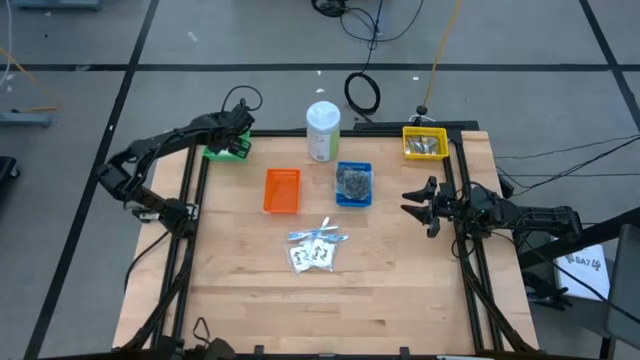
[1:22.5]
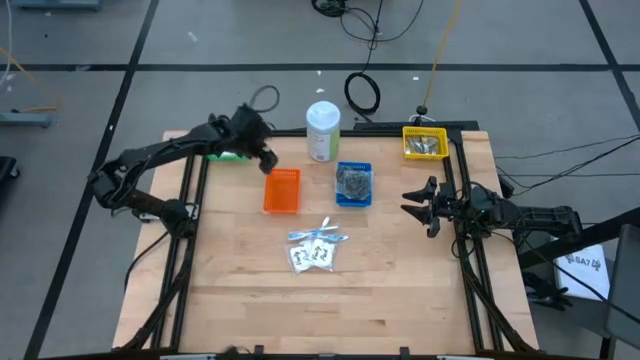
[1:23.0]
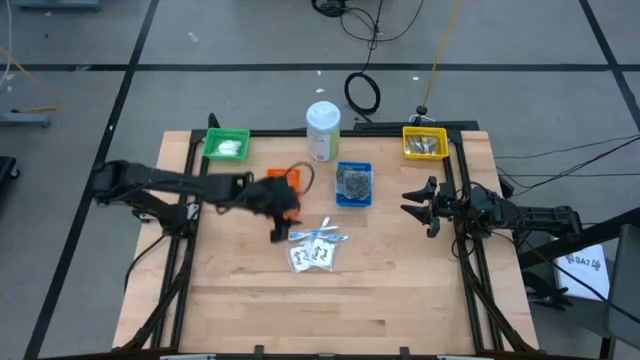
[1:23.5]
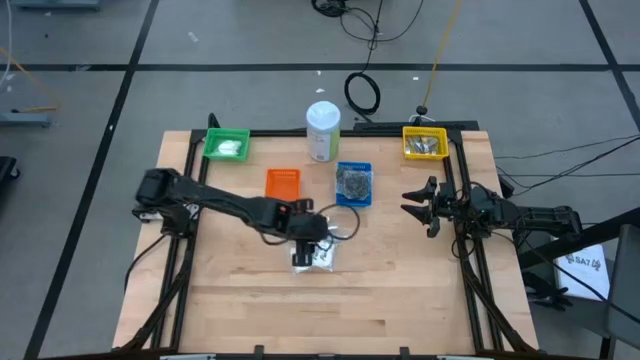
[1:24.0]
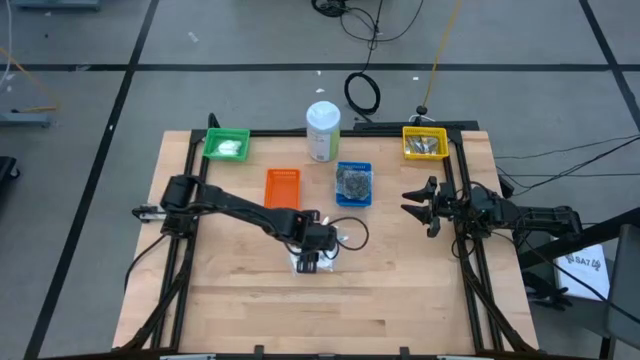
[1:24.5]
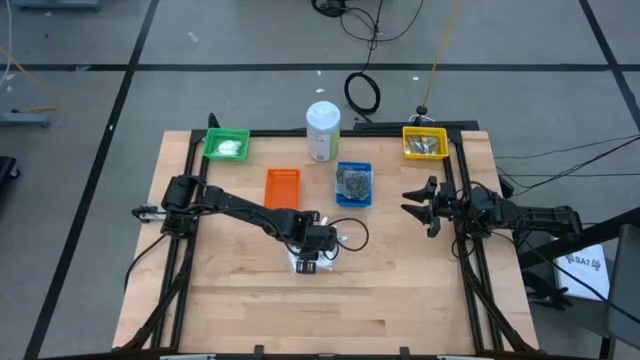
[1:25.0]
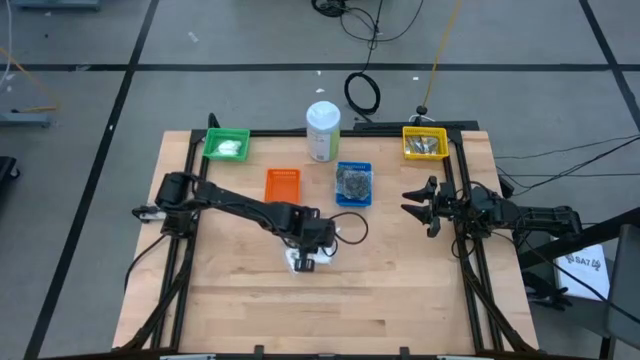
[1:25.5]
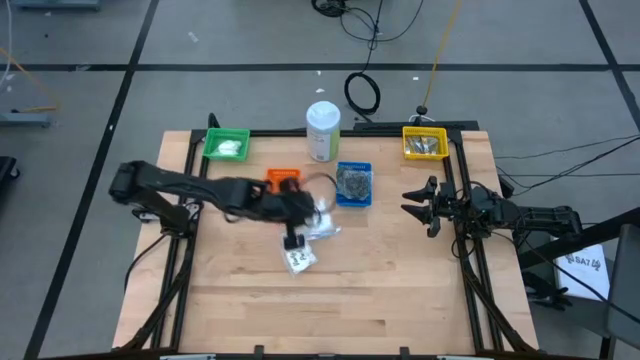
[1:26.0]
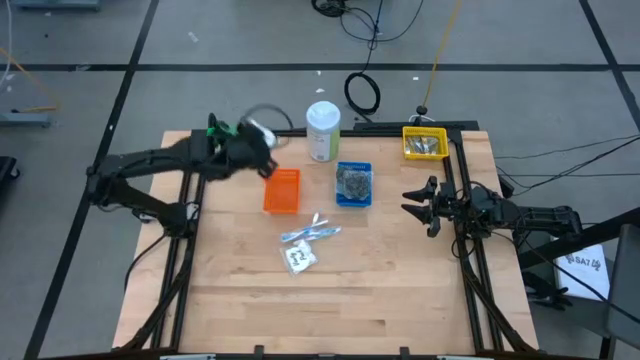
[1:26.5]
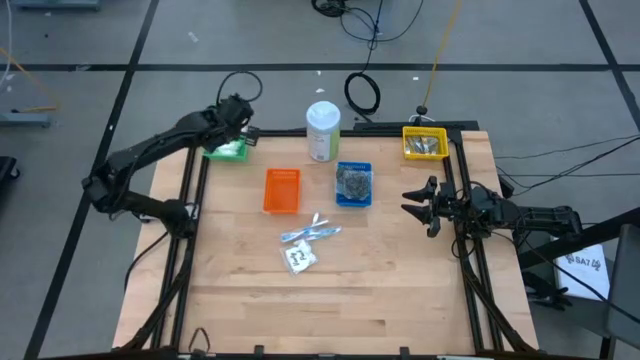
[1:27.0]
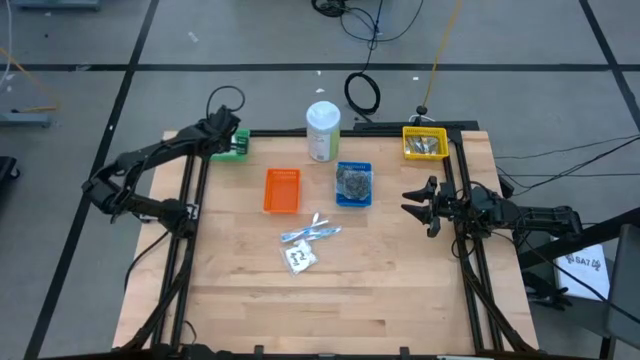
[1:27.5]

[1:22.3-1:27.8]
Task: Pick & Place Travel size toiletries
Put the right cotton pack into the green bin

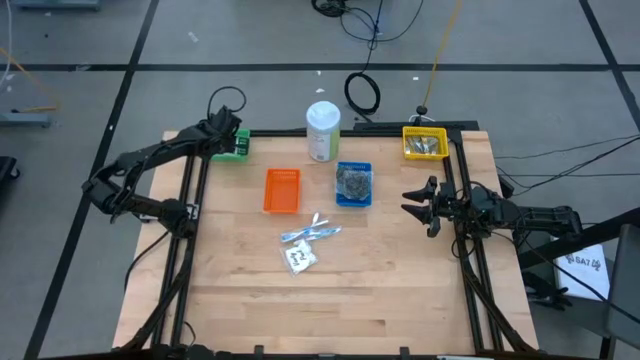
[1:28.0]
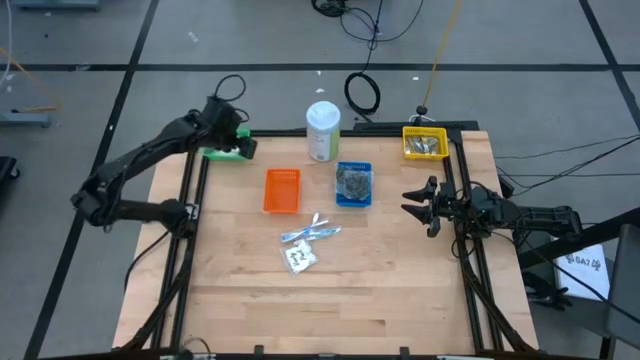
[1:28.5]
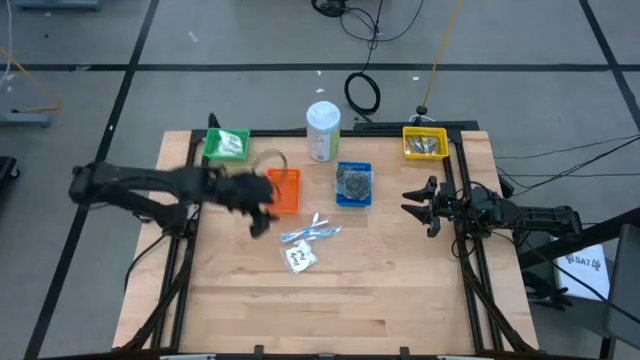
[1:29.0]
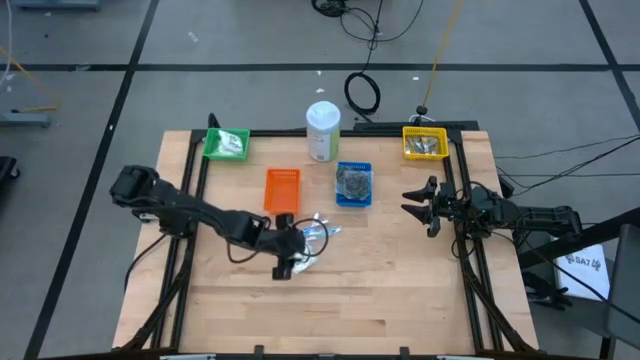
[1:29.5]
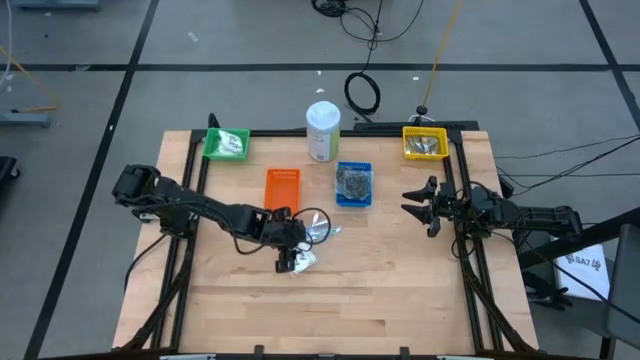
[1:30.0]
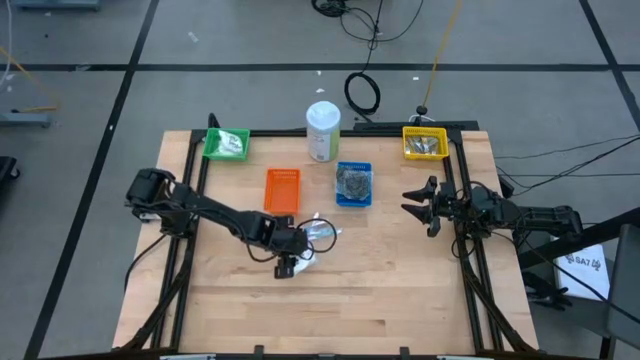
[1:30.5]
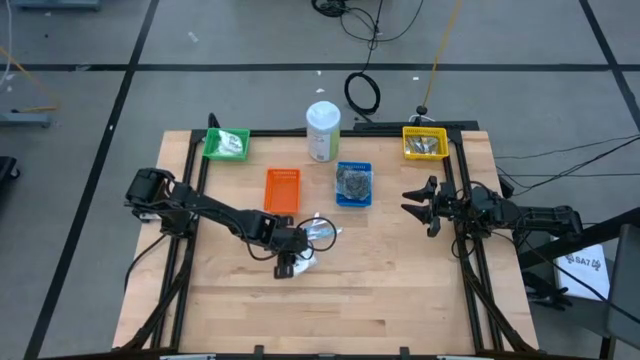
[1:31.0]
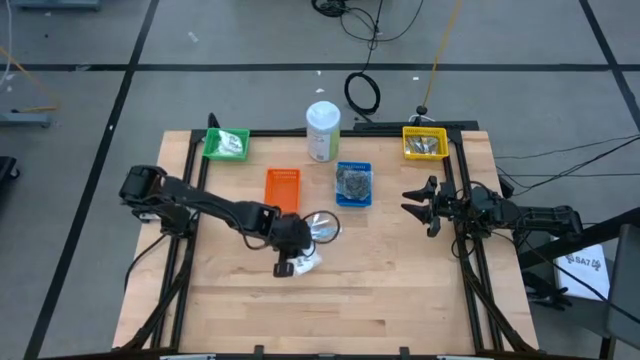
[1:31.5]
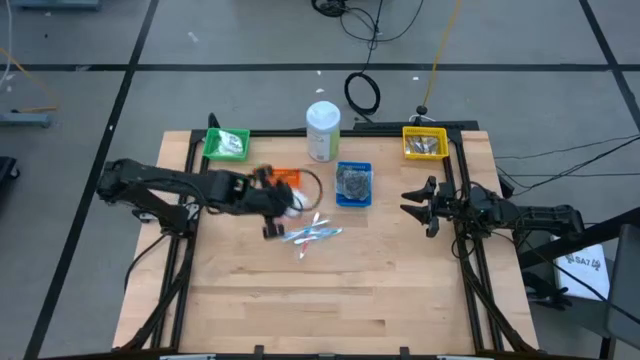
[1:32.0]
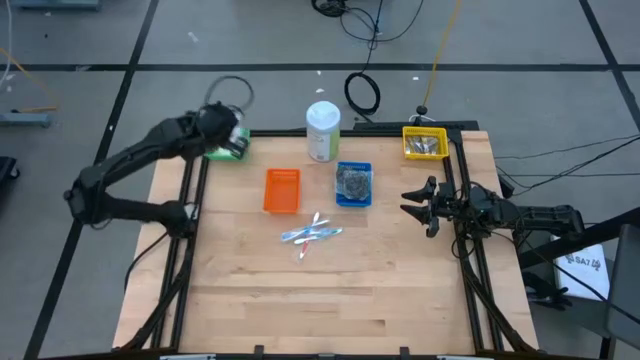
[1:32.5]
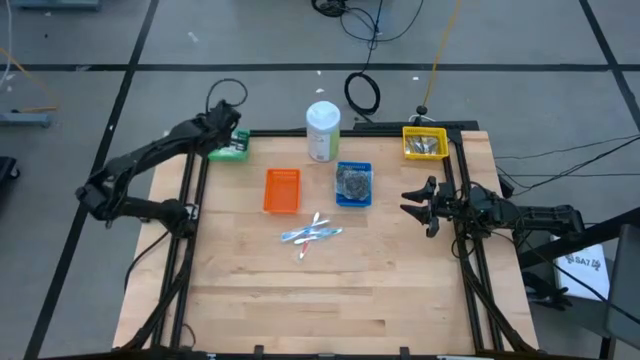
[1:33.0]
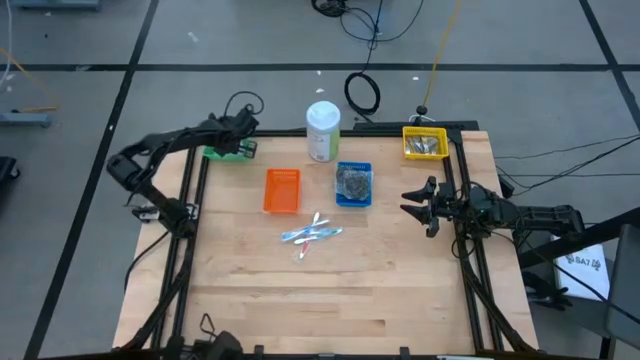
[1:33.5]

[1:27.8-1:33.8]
Put the cotton pack into the green bin

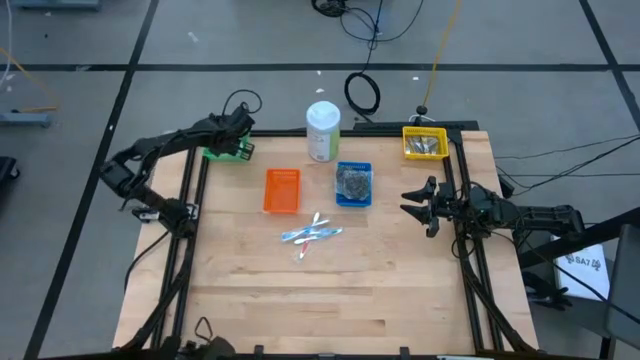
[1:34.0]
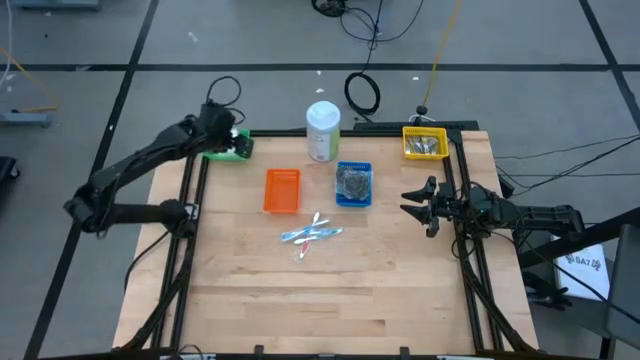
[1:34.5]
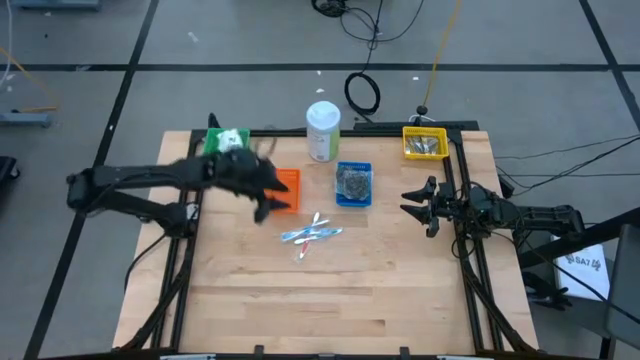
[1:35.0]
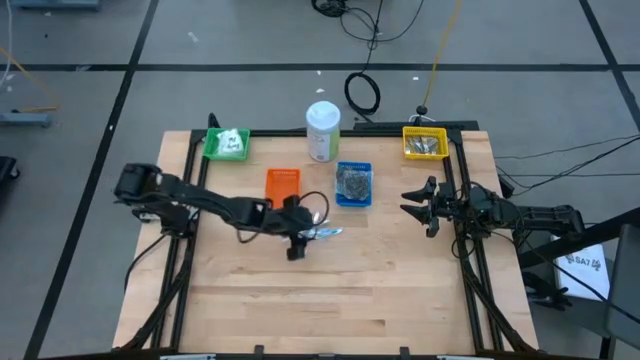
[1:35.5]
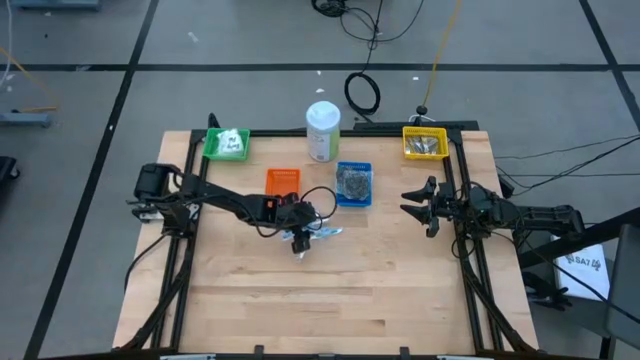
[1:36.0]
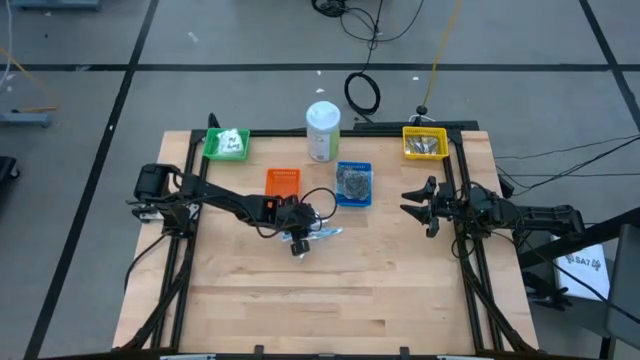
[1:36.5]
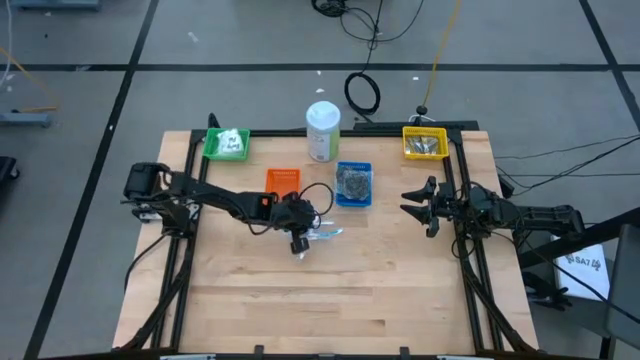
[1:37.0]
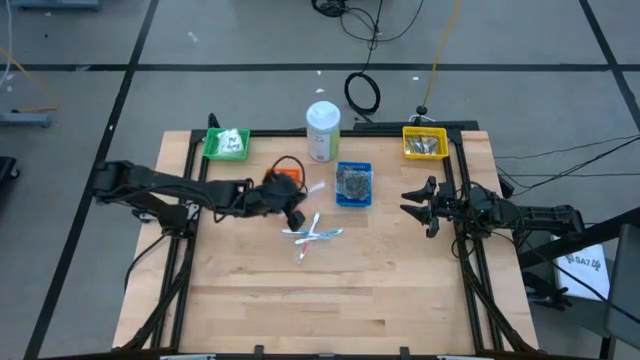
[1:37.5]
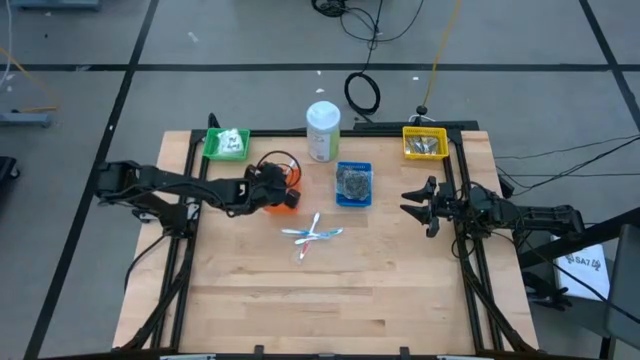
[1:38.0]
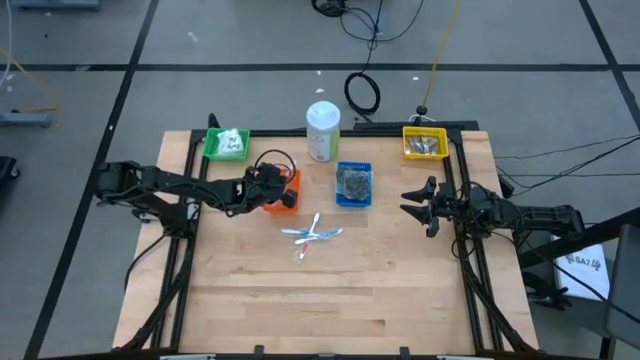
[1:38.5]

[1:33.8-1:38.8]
Put the blue toothbrush into the orange bin

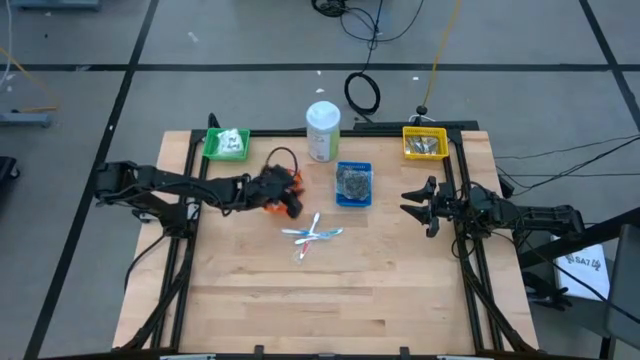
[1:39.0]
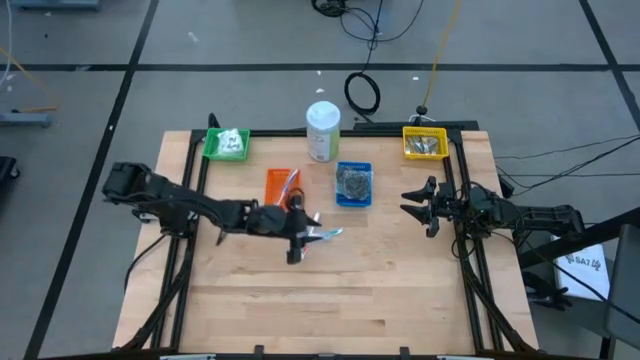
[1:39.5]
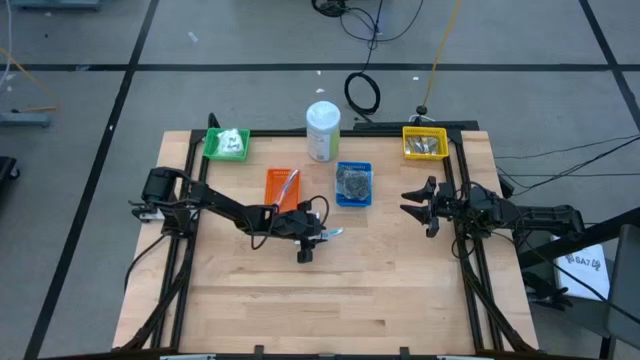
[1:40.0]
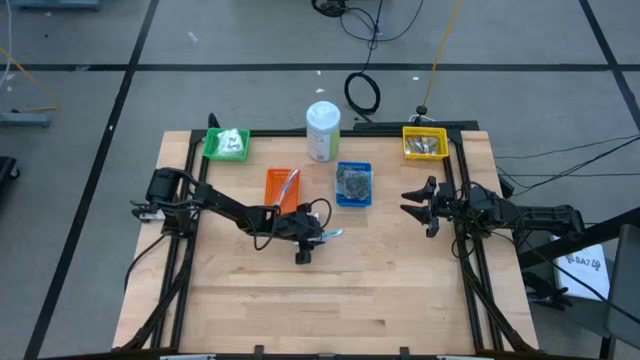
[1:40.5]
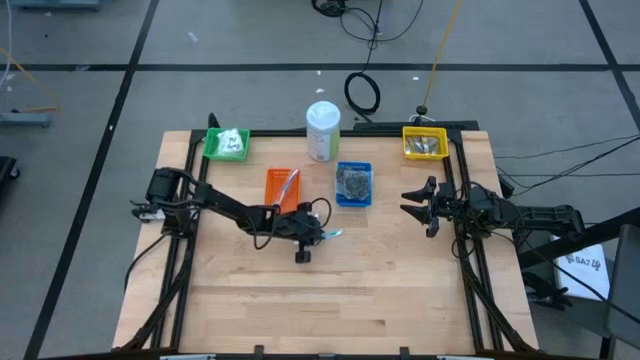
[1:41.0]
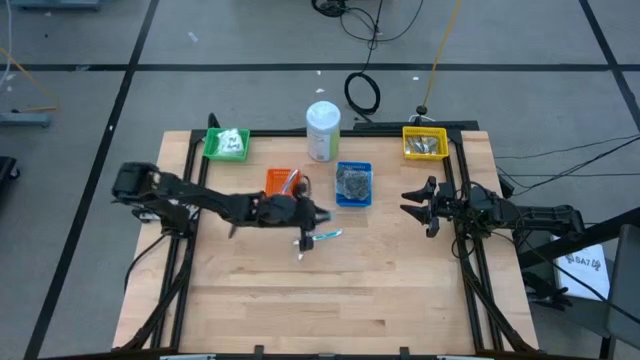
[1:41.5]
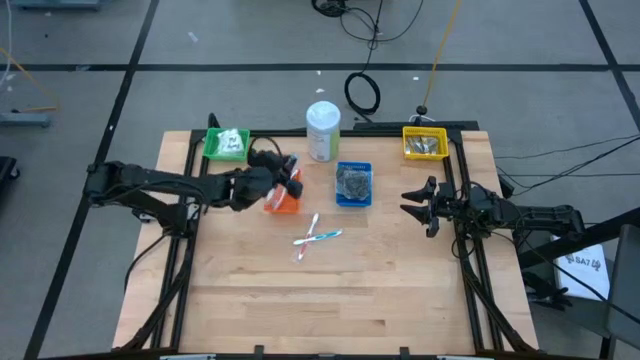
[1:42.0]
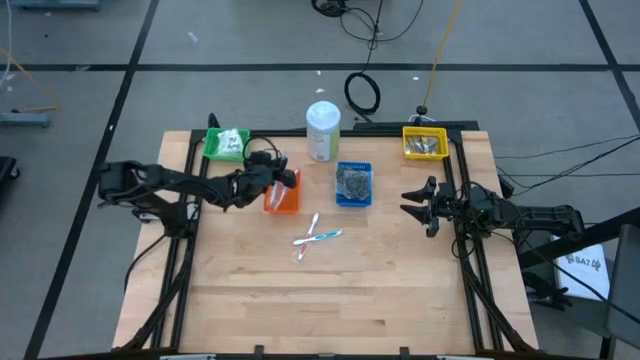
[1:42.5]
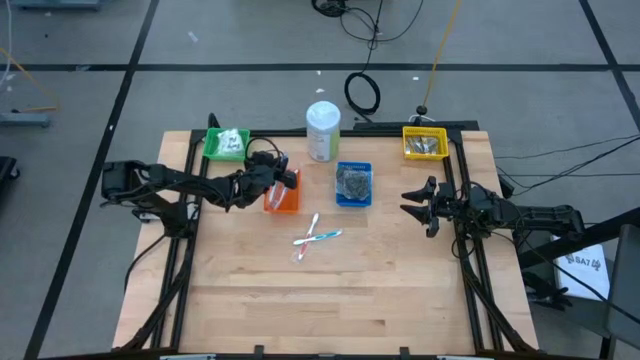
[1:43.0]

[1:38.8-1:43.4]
Put the blue toothbrush into the orange bin

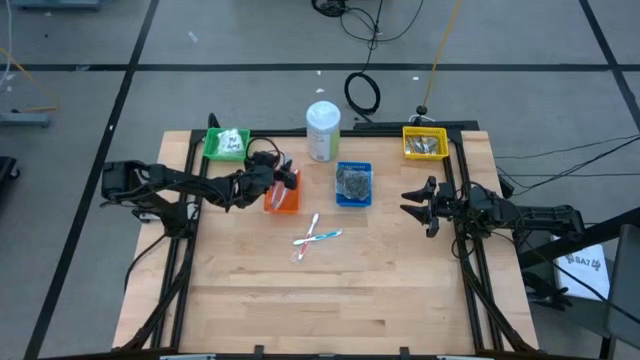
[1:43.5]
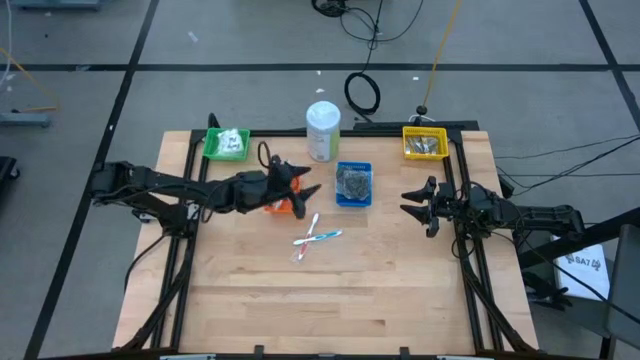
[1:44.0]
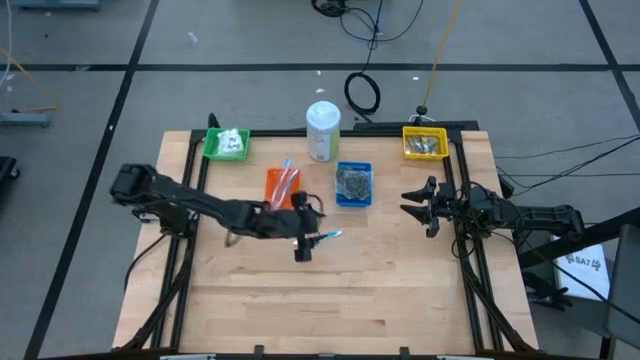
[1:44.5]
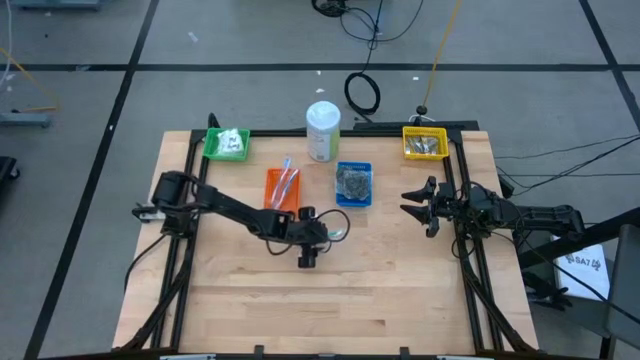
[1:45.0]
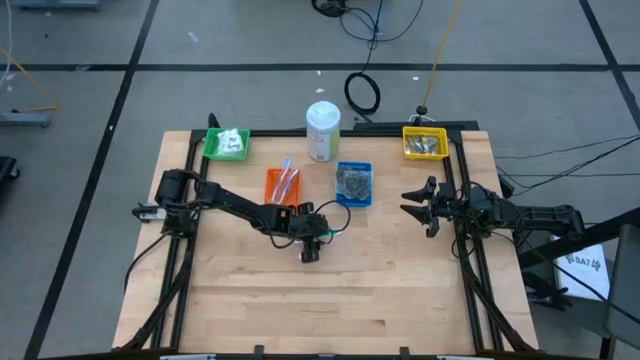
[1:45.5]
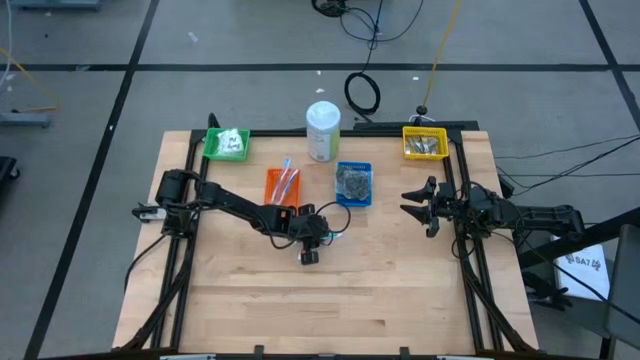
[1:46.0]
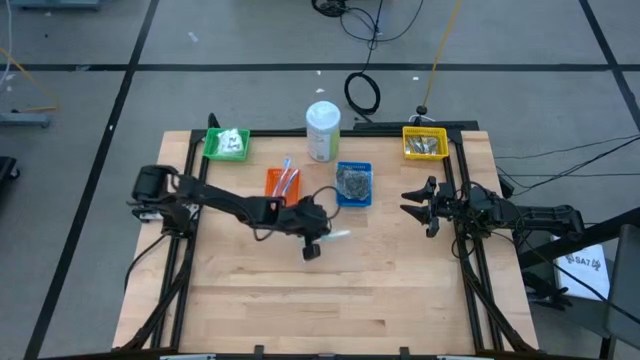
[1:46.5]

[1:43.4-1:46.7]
Put the blue toothbrush into the orange bin
